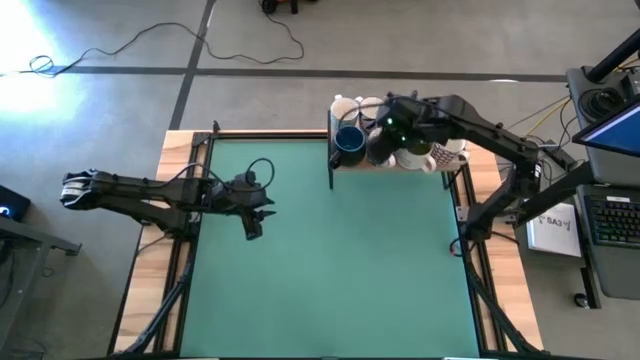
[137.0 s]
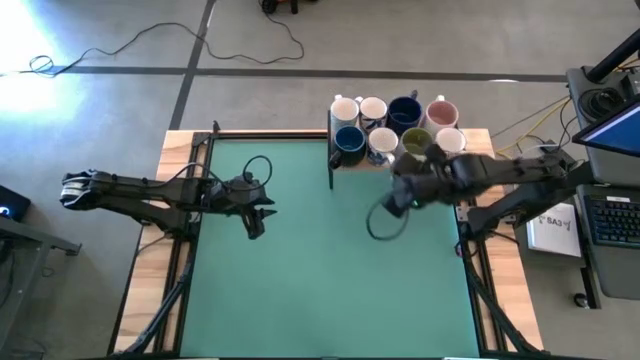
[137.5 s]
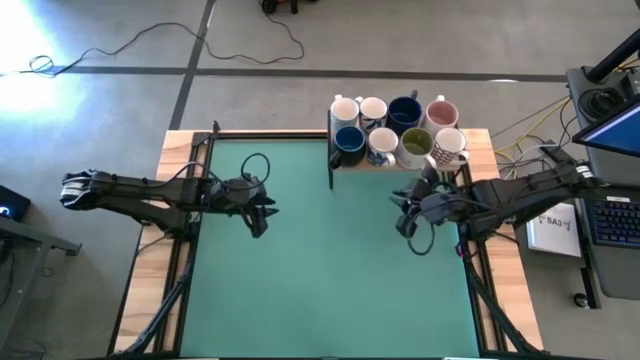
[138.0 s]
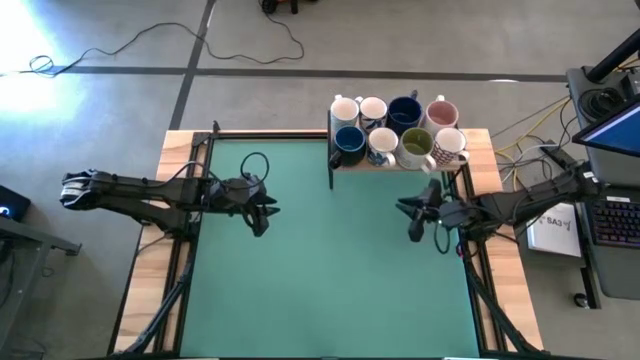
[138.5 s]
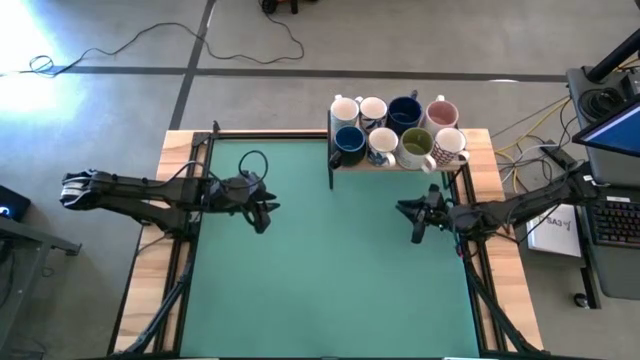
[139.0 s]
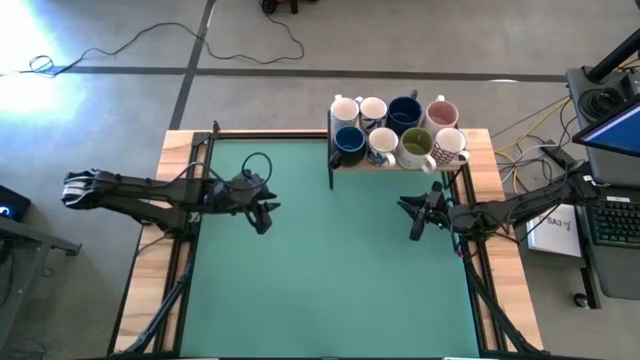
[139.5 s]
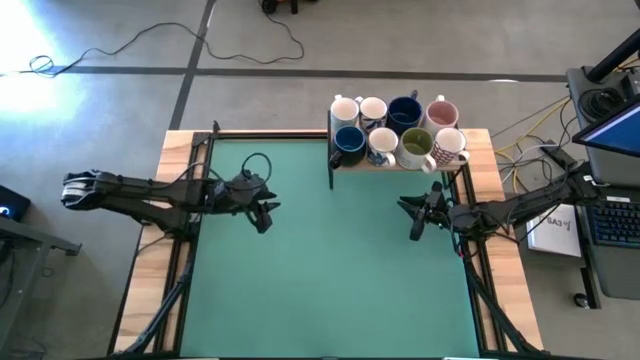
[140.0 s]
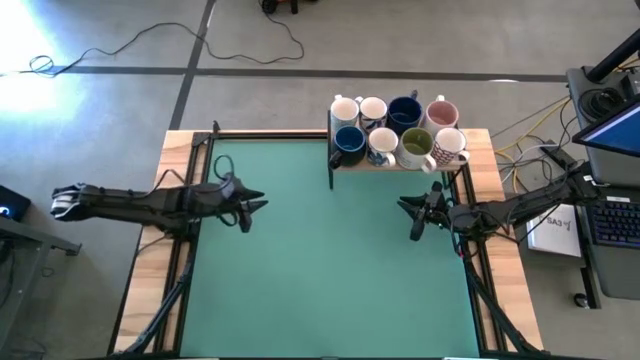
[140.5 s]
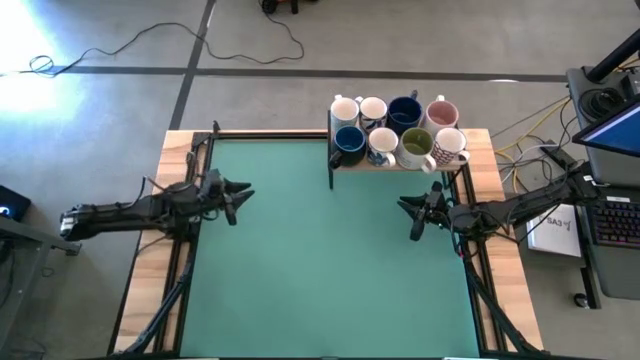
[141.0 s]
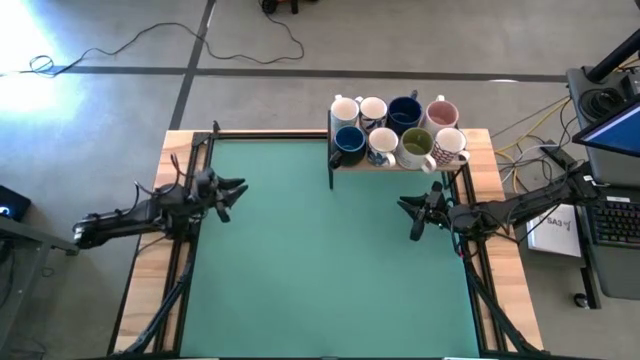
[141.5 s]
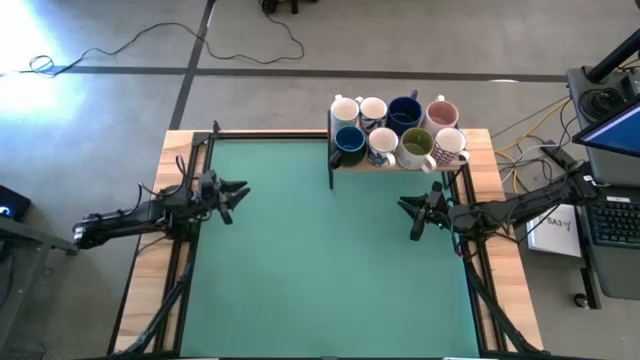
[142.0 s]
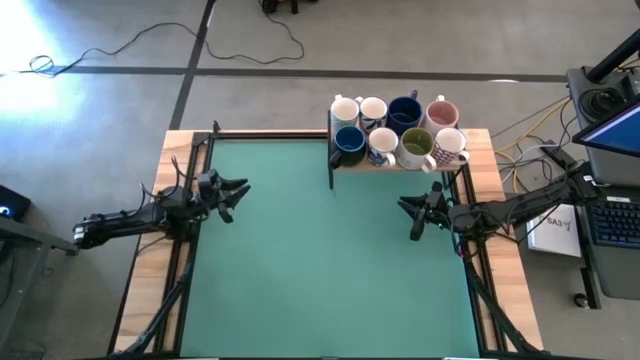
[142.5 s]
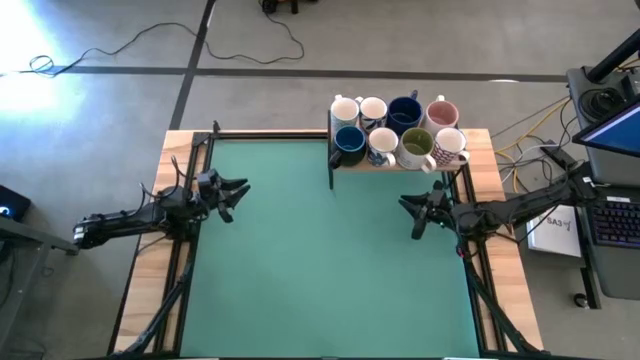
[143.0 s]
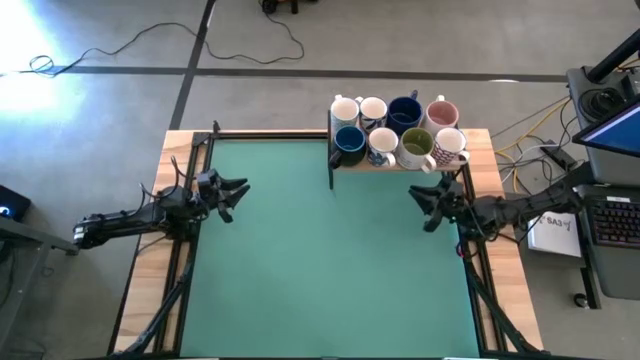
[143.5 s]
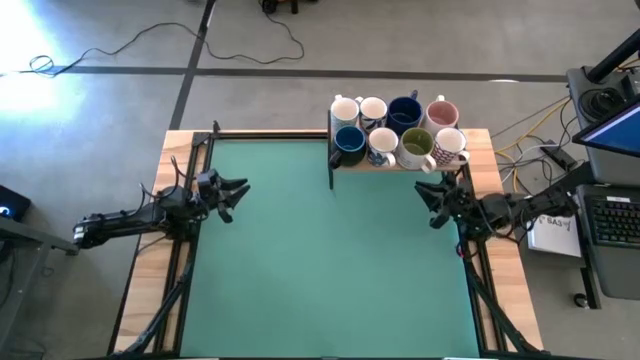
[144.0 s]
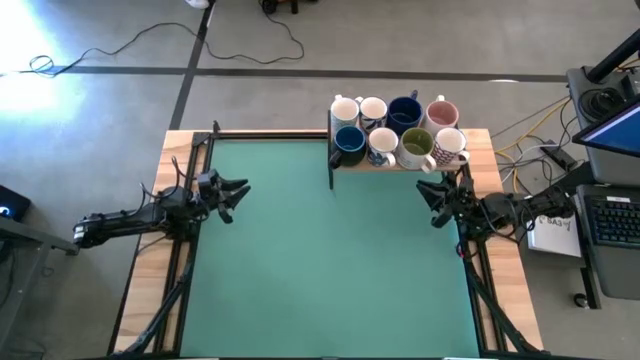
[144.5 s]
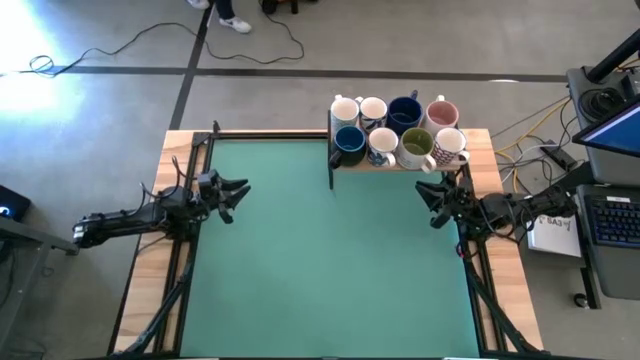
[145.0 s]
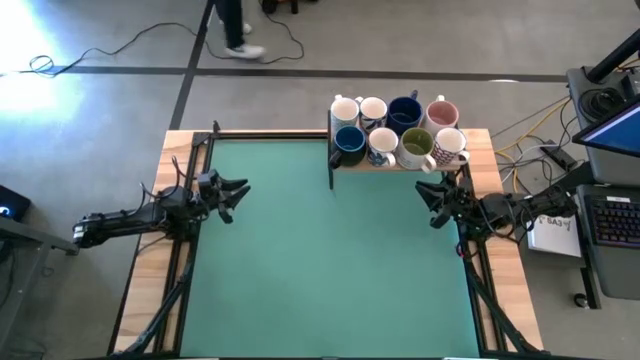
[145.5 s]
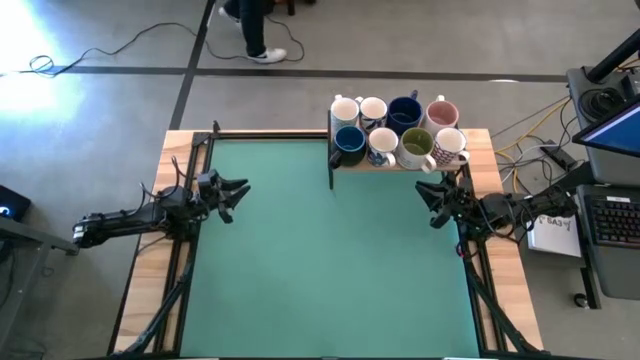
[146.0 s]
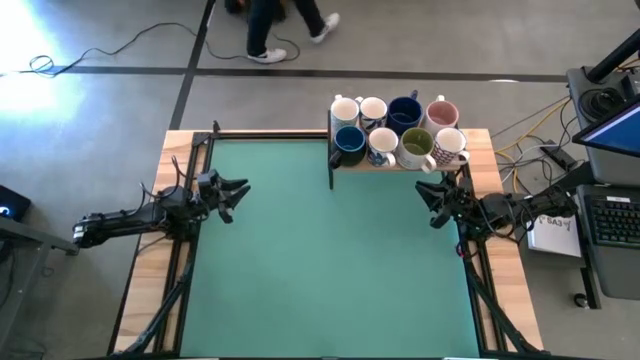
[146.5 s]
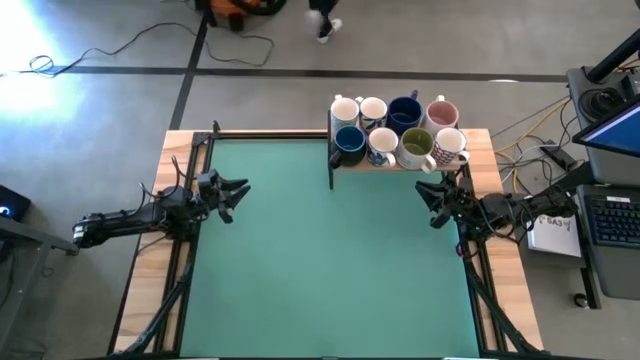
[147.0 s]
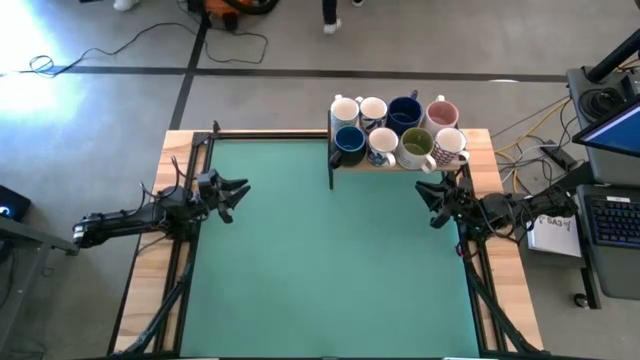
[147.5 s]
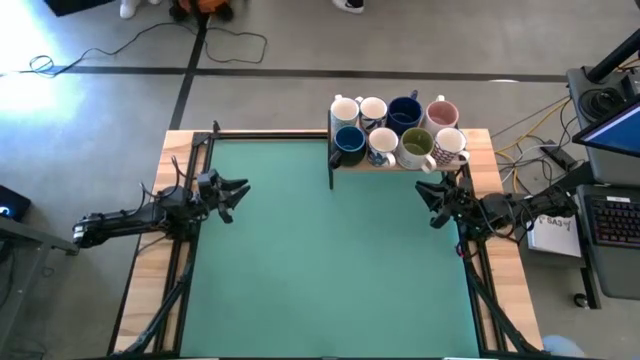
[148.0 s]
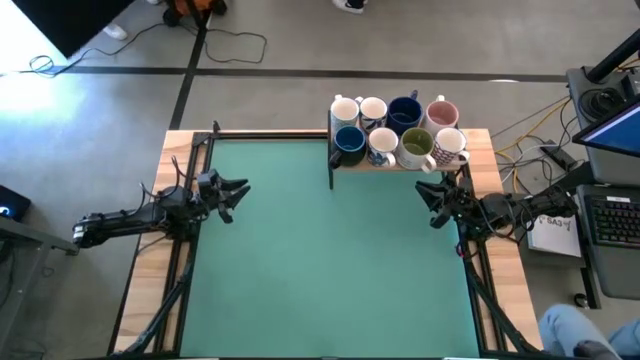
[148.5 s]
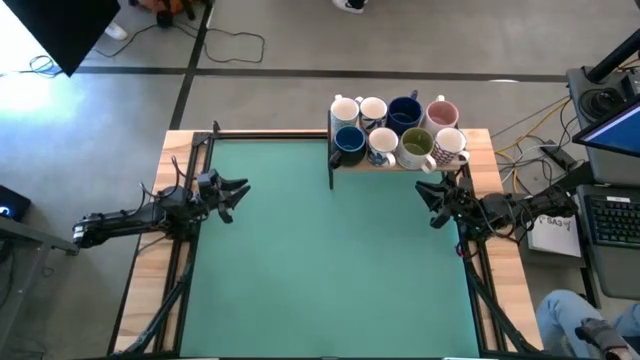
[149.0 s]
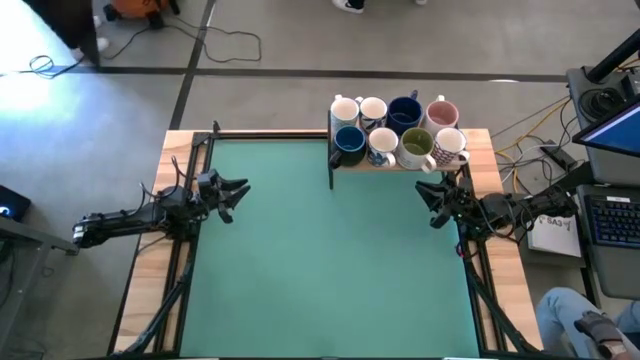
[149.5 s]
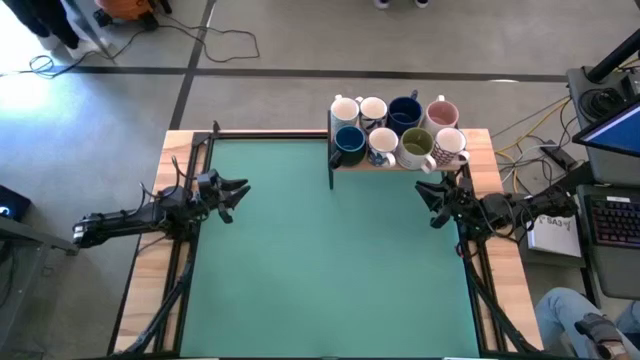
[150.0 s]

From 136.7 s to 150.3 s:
Task: Place coffee mugs
Return to Home Position

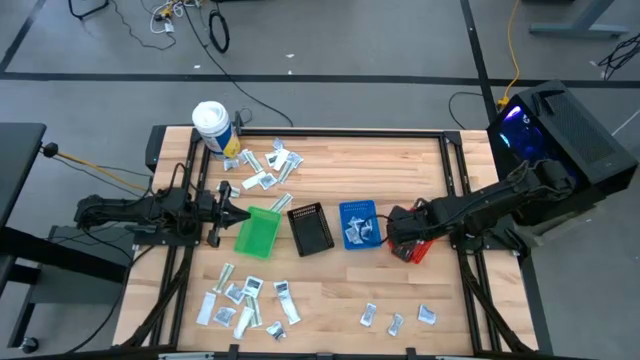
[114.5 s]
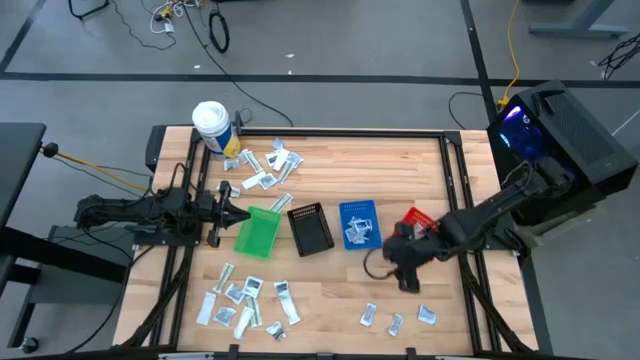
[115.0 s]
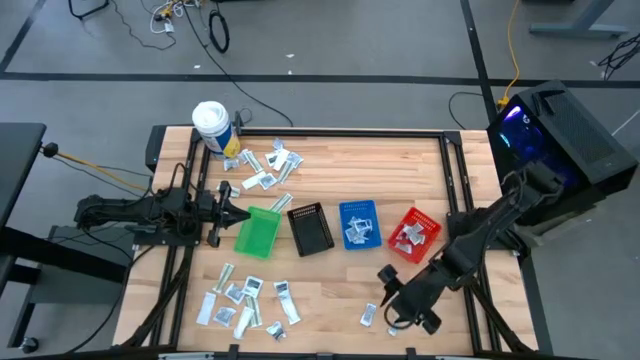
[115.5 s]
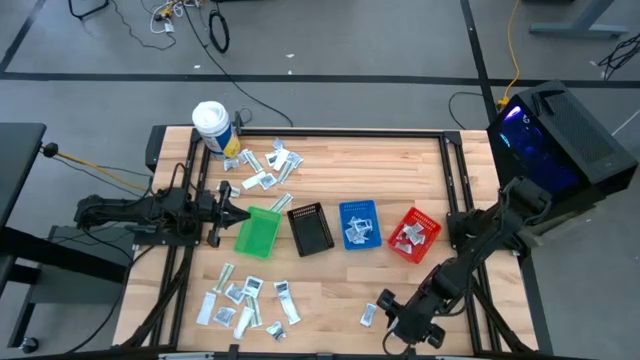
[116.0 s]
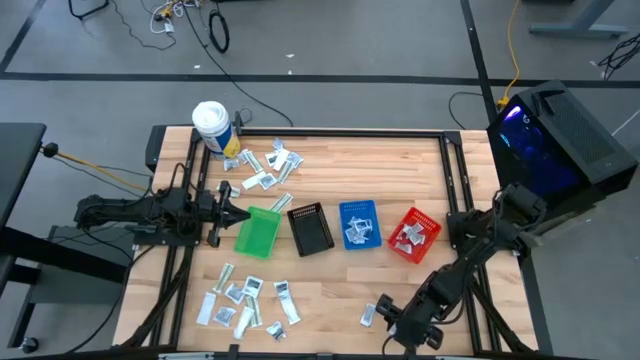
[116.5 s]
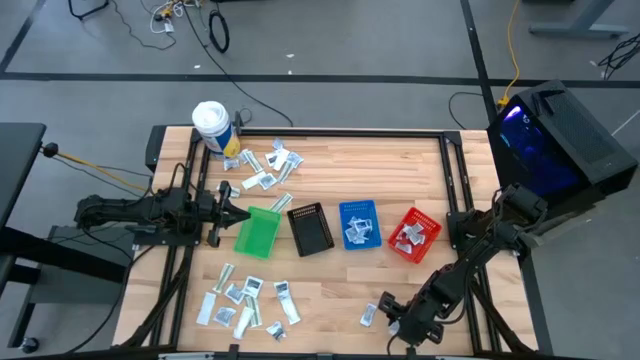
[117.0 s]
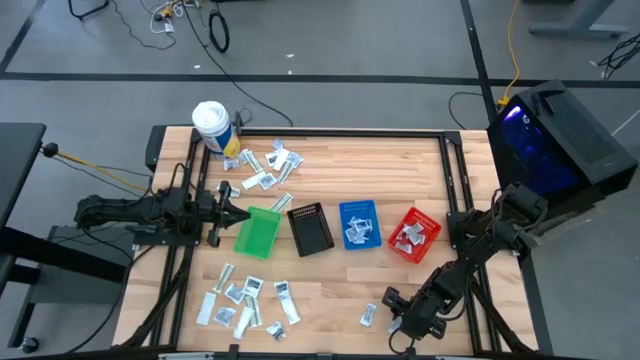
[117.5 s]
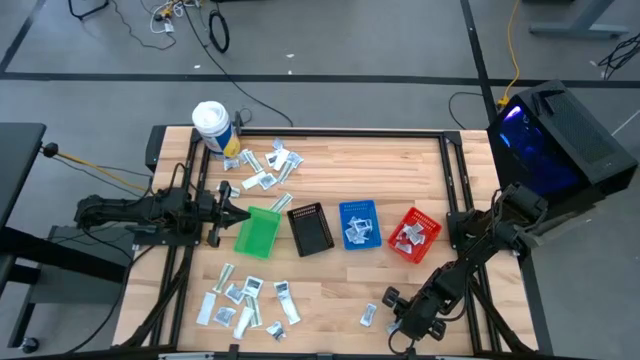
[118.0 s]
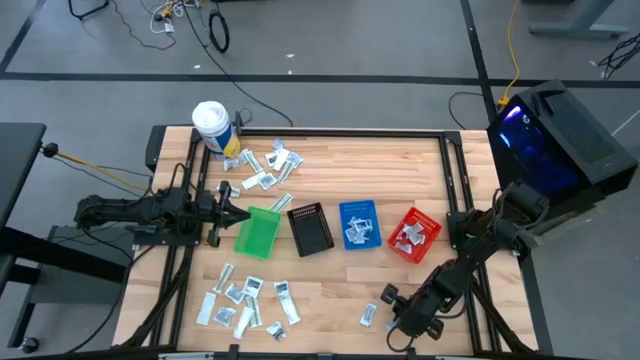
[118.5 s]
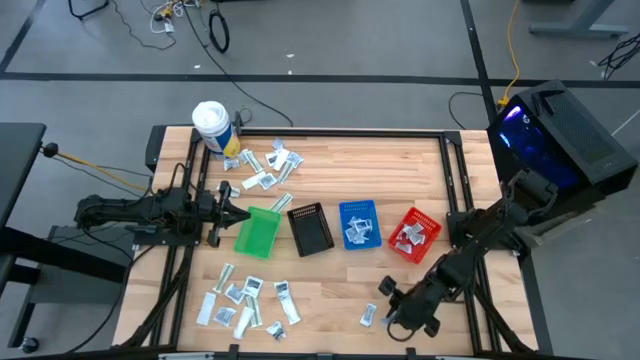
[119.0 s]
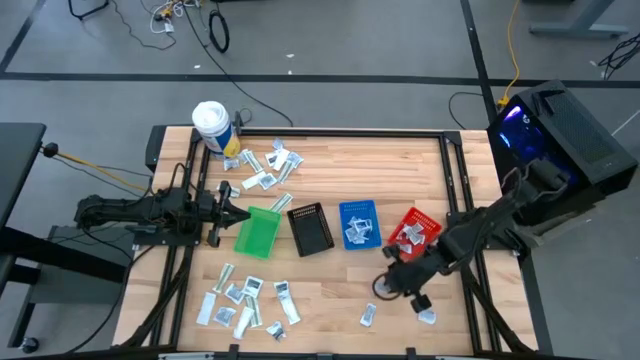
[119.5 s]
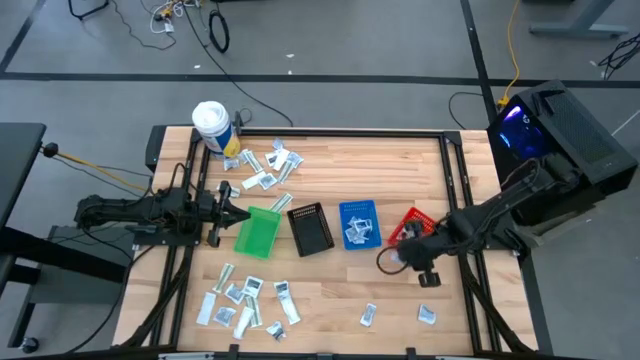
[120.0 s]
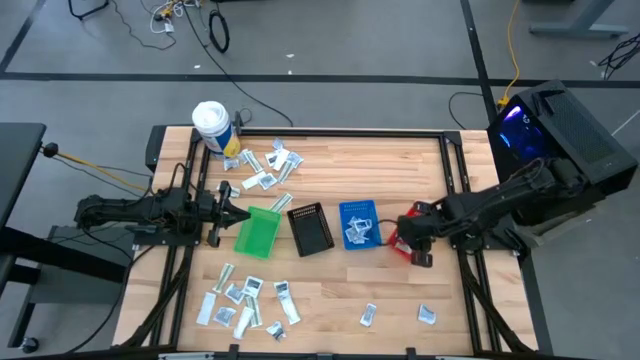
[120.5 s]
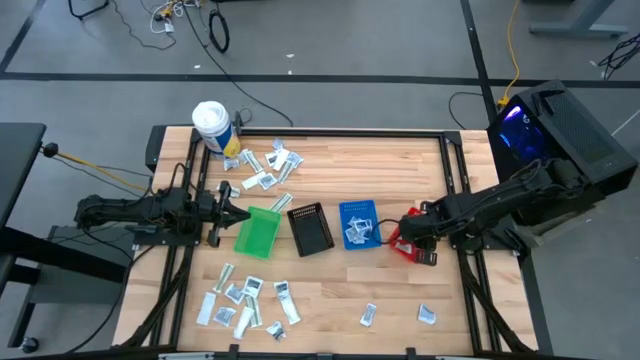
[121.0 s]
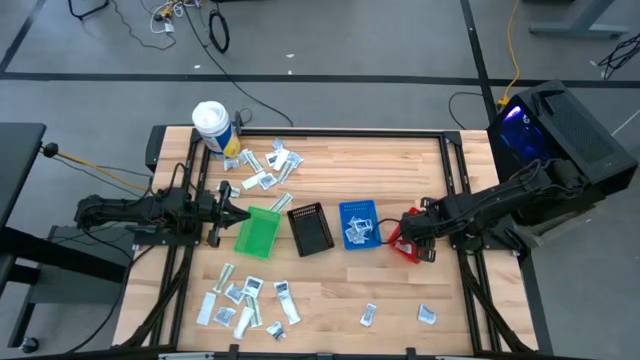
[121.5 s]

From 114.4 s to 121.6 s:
Task: Pick & Place First Aid Supplies
Put the ointment pack into the red basket
